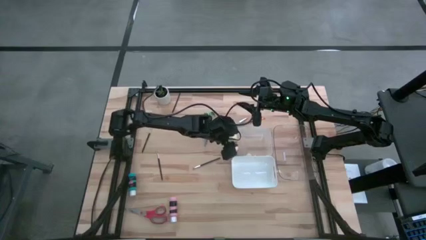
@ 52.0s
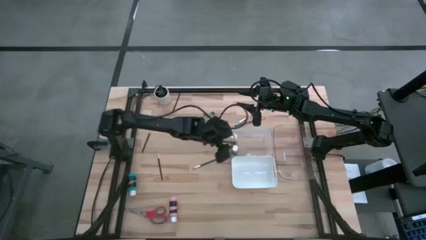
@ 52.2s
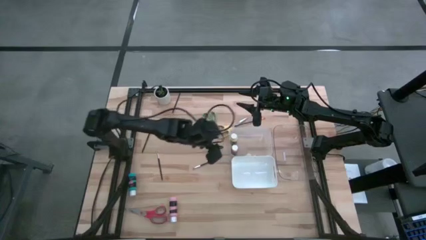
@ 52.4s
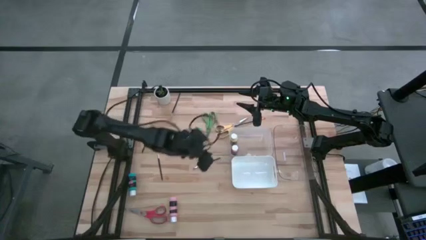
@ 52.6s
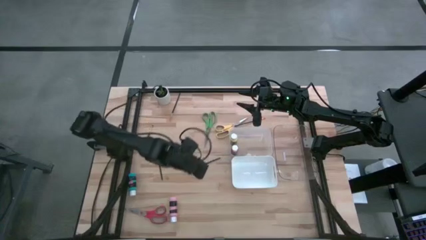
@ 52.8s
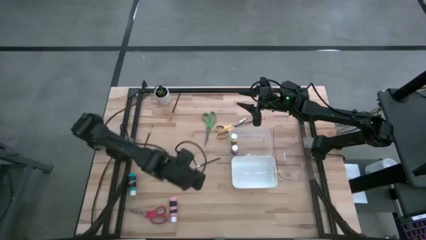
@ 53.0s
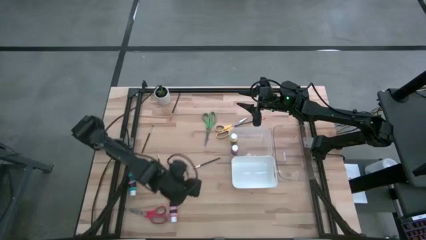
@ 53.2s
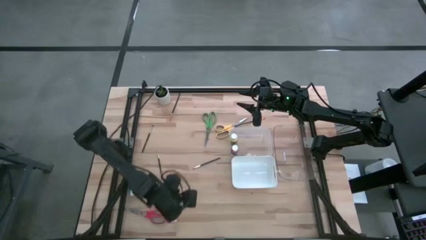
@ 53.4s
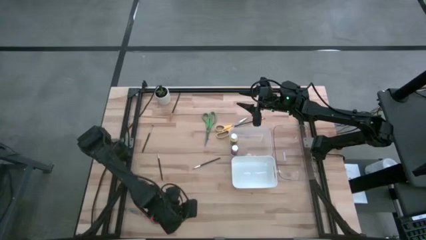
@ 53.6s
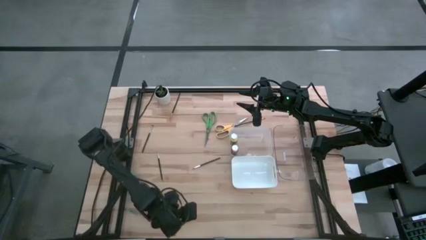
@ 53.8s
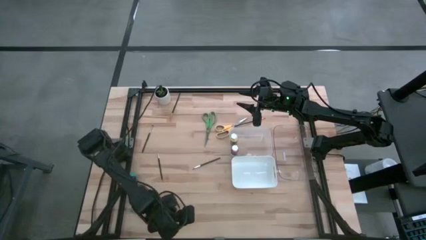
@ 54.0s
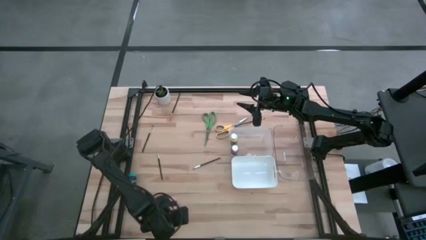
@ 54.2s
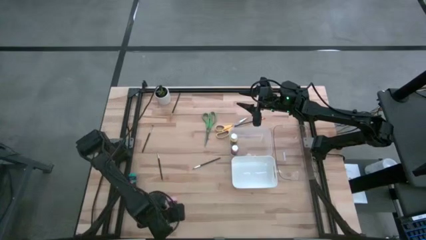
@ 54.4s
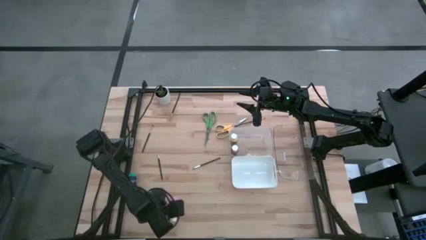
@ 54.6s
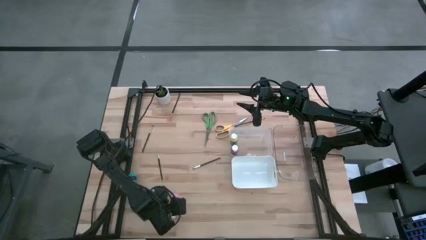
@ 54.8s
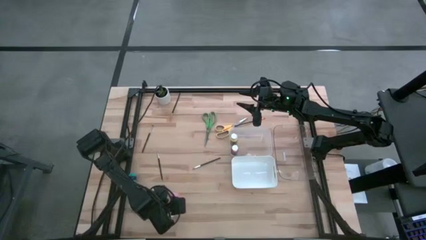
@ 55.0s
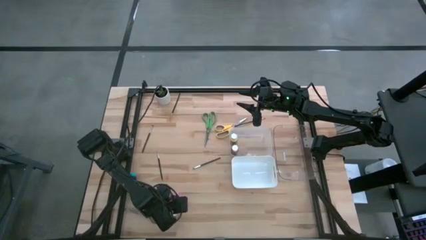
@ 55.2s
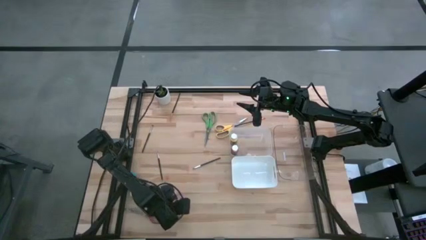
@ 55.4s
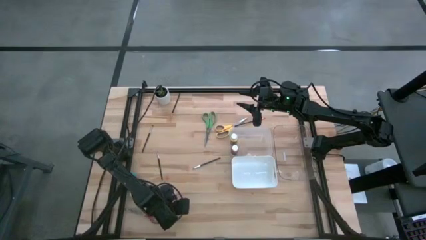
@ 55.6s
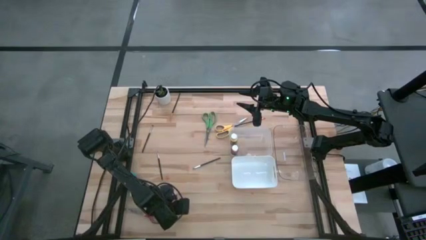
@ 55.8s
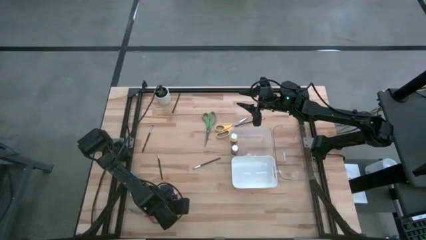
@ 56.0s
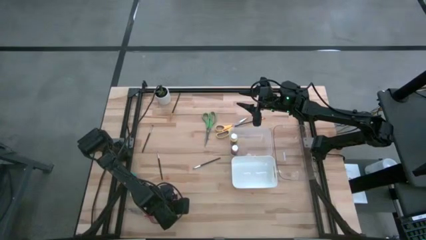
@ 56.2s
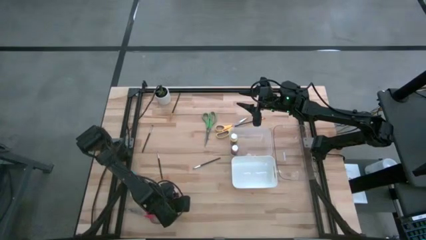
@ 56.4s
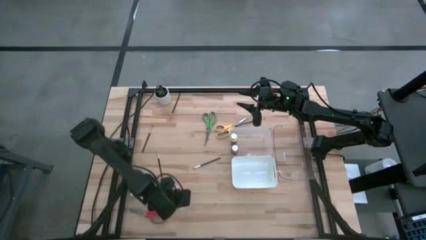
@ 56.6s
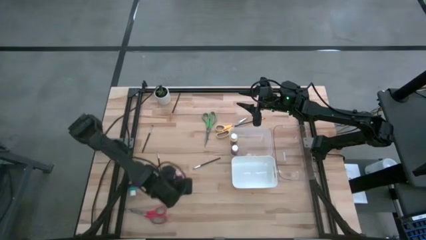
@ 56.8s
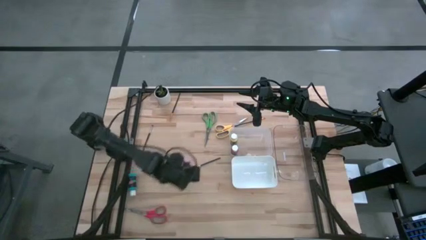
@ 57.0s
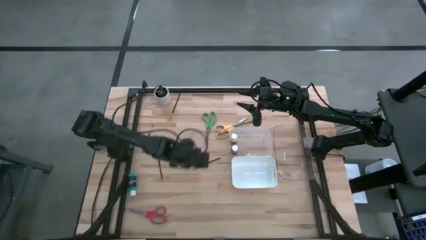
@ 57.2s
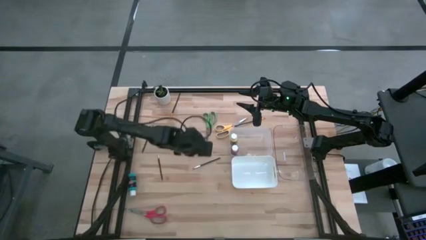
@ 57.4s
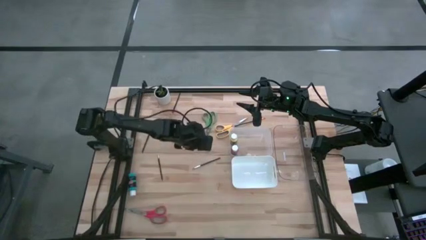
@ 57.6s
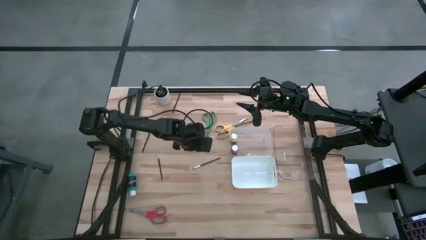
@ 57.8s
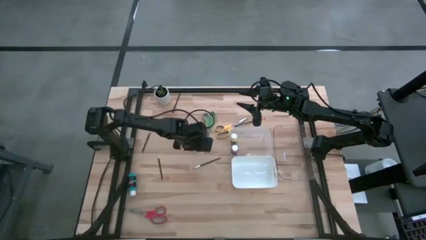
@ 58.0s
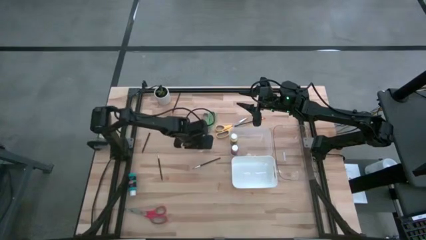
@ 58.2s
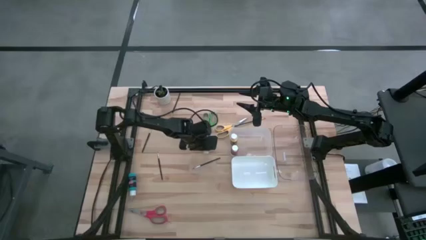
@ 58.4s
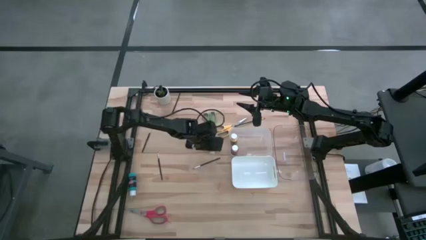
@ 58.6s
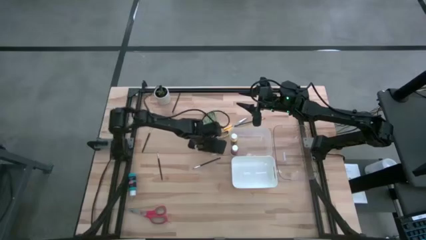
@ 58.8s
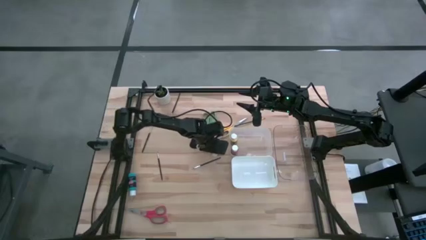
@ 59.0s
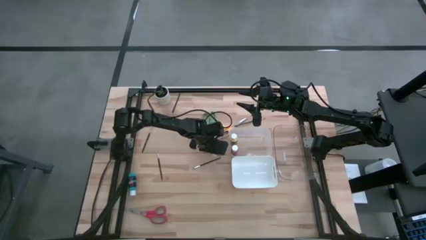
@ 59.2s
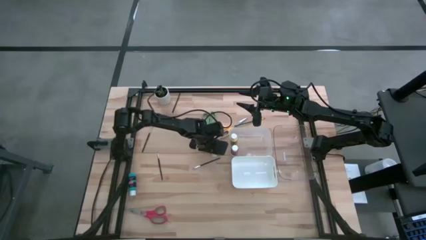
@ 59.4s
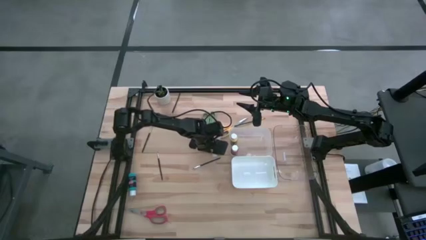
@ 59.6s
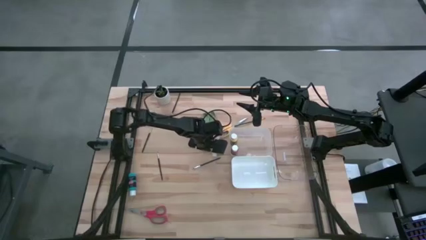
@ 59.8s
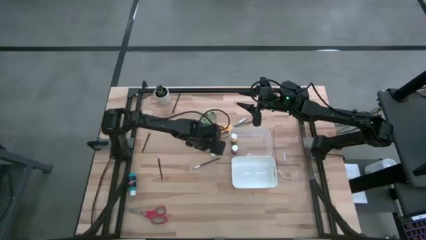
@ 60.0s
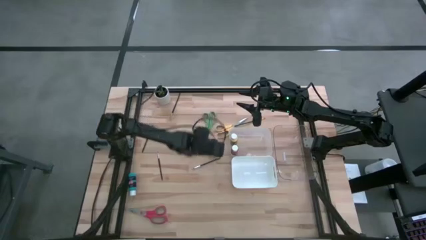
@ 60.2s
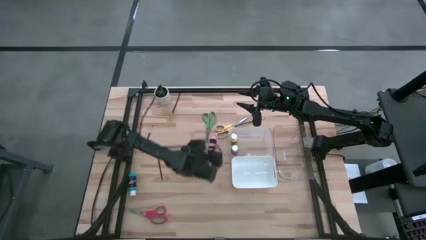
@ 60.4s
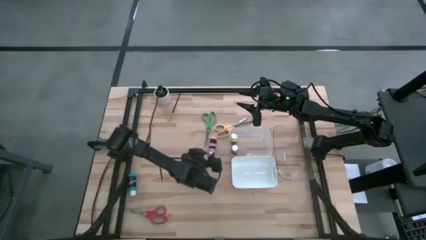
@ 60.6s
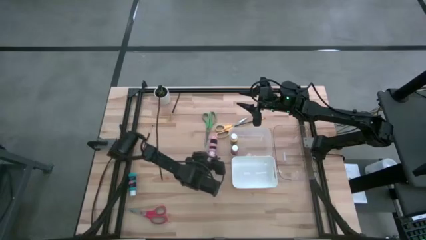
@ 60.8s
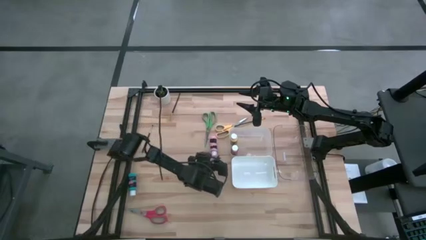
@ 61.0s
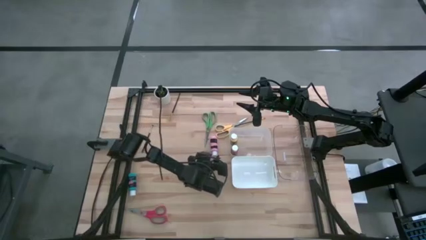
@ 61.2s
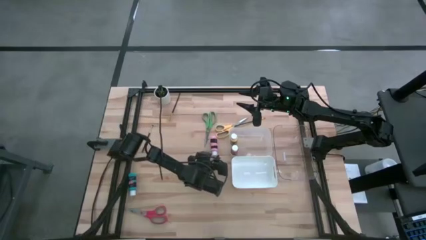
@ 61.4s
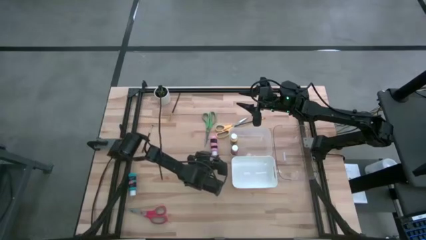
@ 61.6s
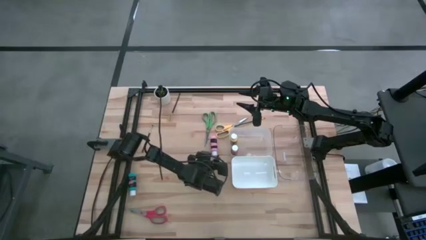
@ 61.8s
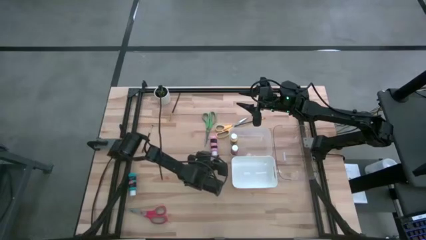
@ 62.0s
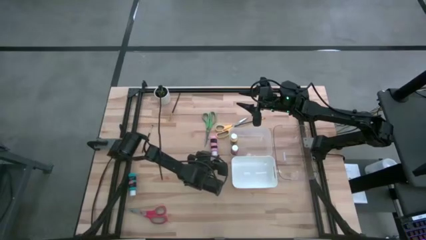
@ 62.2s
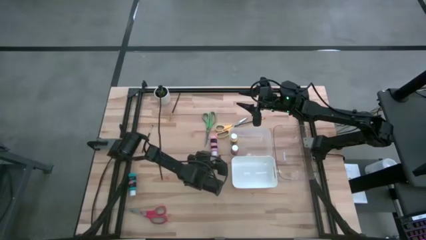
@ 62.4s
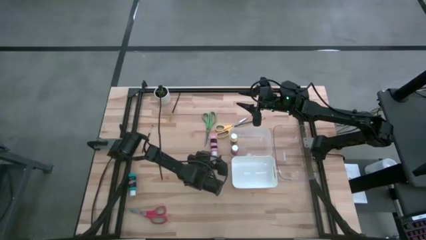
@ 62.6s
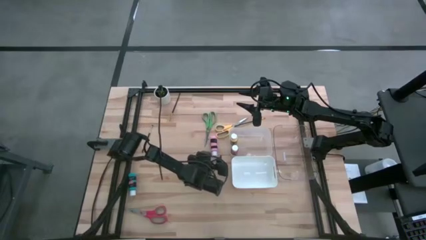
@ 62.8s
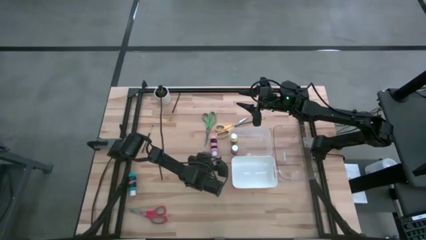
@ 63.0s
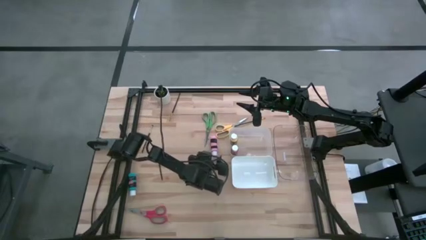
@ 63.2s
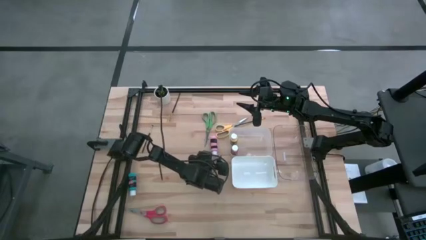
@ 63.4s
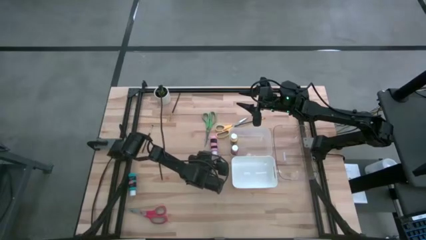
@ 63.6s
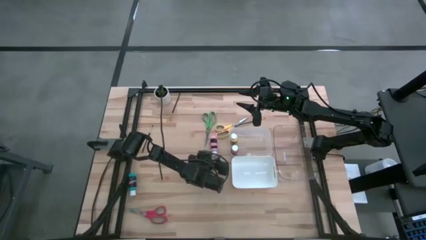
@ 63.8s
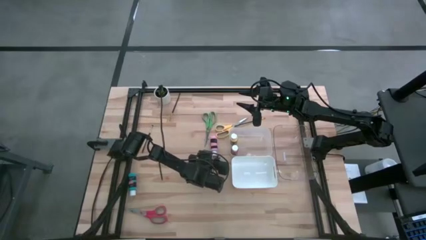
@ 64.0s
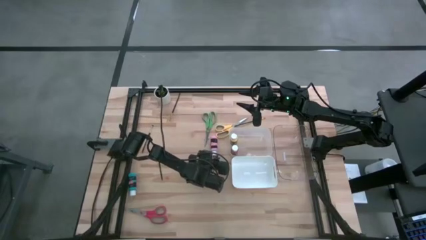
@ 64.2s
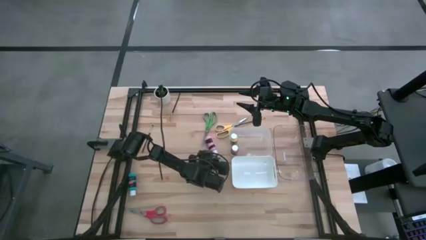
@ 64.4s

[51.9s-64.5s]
Task: Pick & Place Paint Supplies
Put the pink paint bottle into the left transparent bin

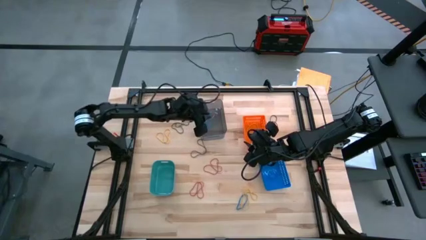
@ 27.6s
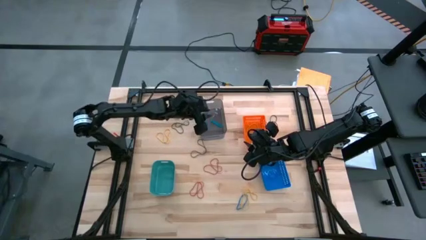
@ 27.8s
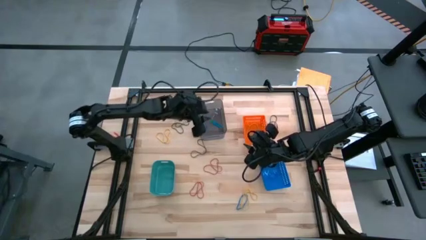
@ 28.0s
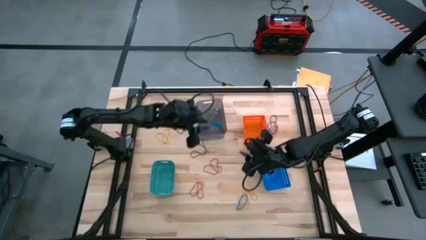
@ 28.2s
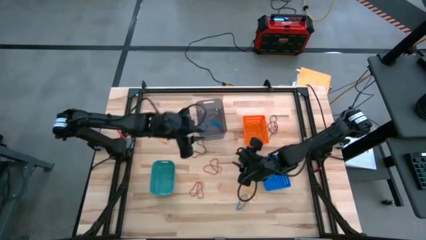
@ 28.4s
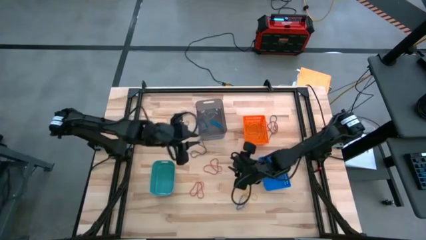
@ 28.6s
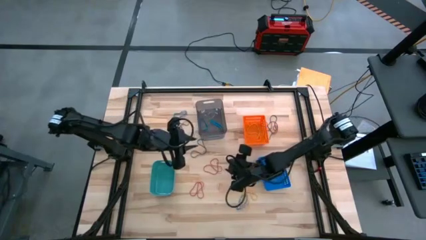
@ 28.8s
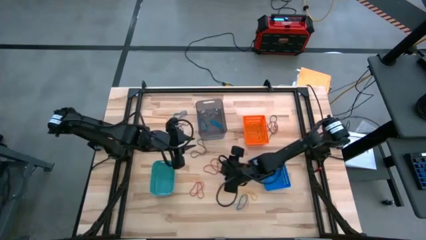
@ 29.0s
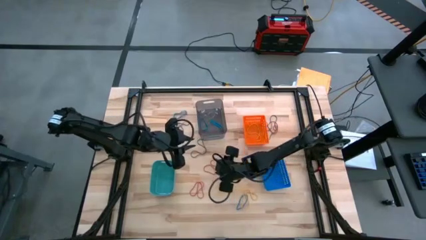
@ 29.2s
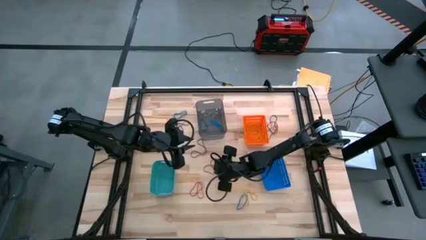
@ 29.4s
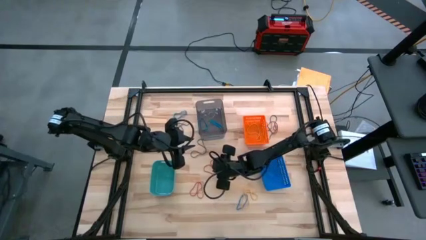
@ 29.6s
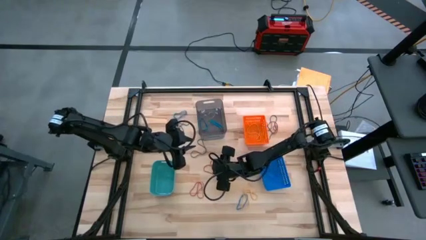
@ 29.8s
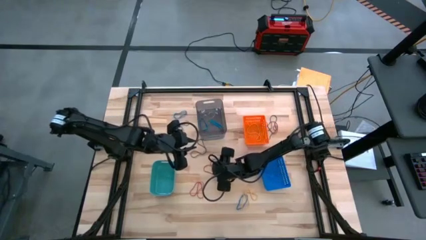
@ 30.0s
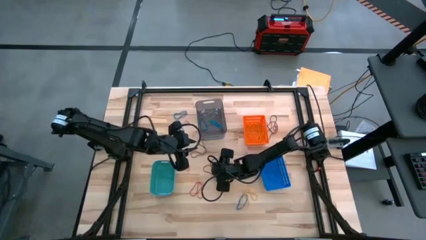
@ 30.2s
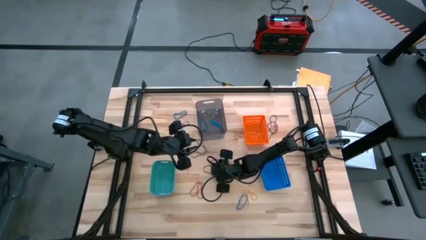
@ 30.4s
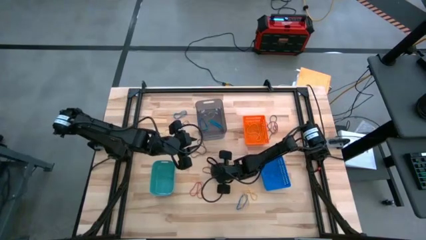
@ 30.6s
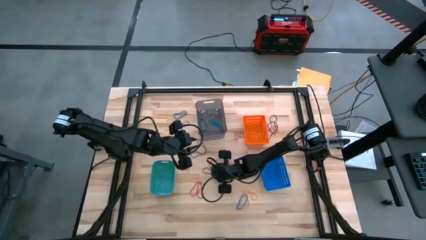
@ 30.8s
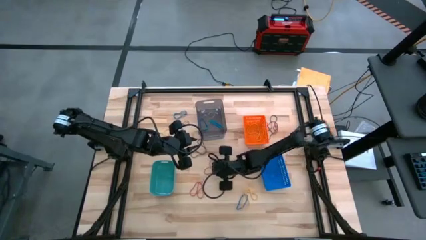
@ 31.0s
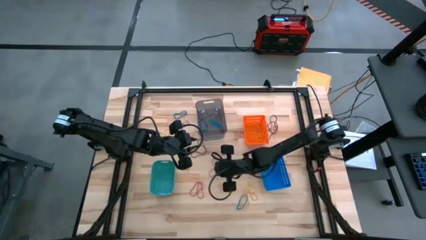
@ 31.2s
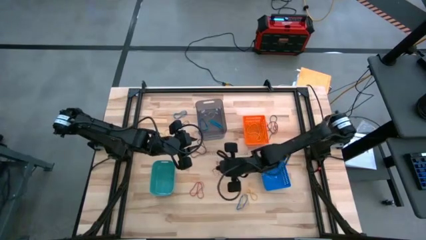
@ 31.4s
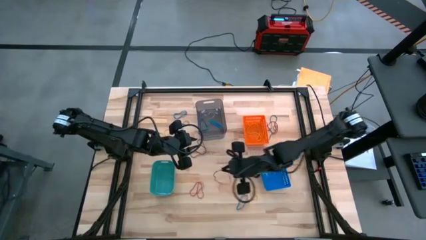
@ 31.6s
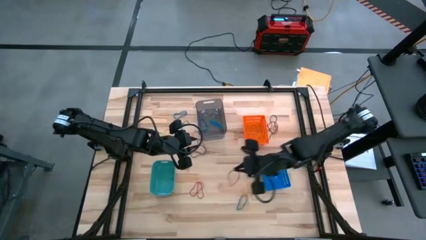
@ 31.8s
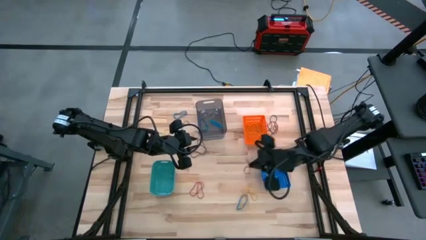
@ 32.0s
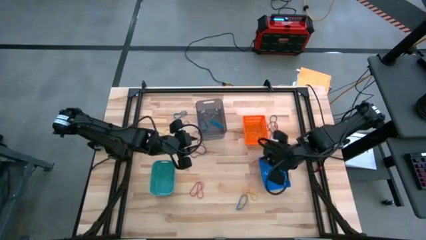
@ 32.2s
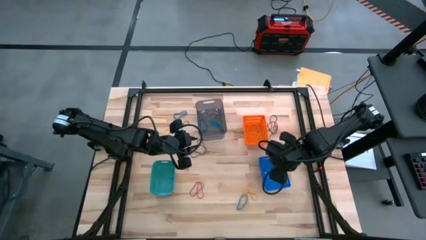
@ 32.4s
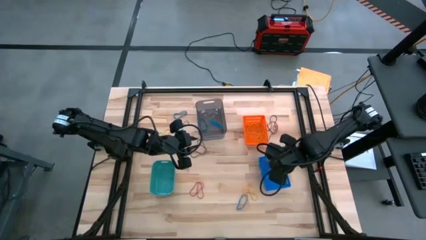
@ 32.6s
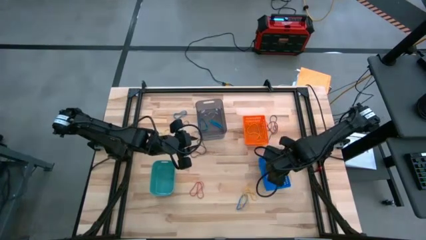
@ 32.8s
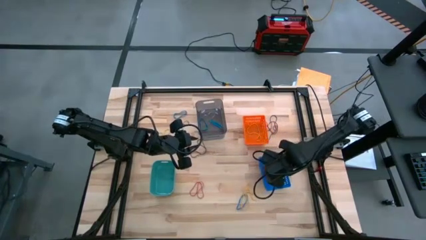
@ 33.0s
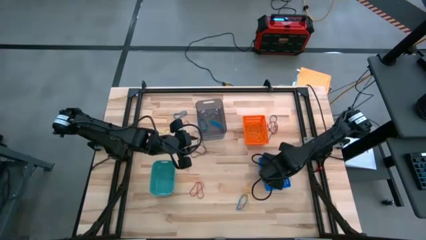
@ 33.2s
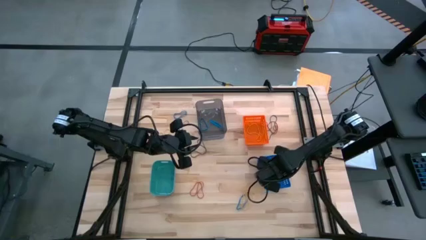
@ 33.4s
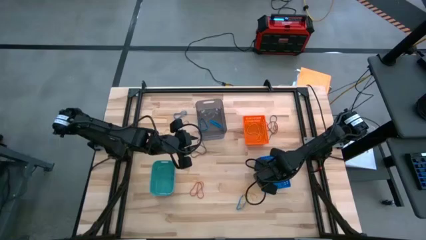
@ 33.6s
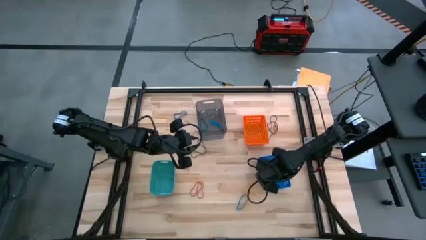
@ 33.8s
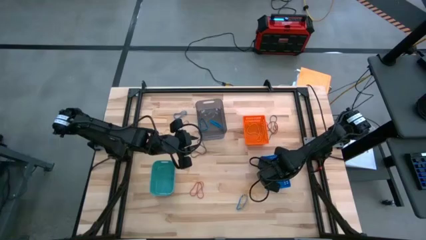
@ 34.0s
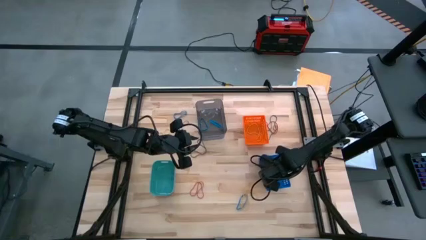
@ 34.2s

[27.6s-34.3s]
Task: Sort rubber bands into baskets
Put the red rubber band into the blue bin
